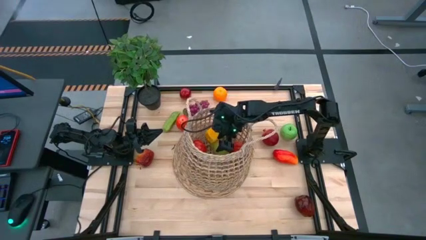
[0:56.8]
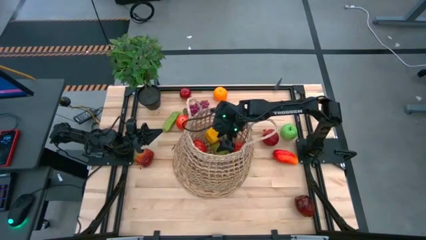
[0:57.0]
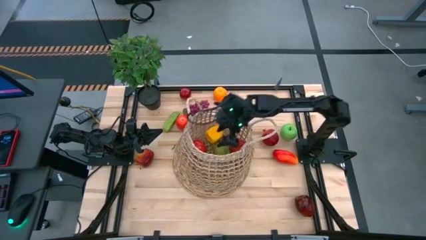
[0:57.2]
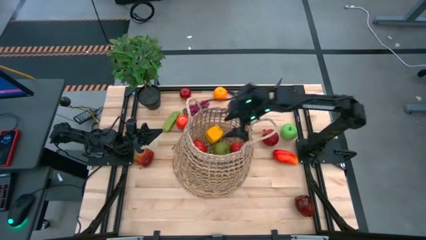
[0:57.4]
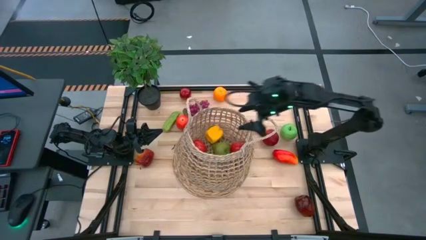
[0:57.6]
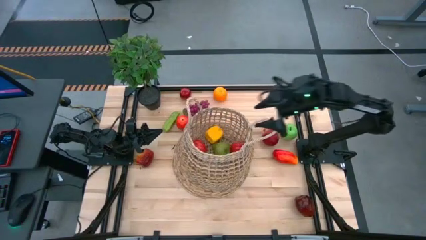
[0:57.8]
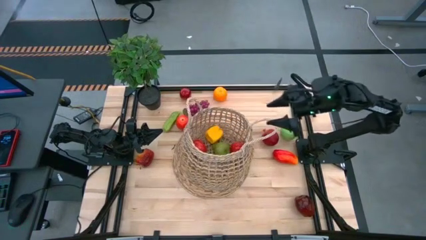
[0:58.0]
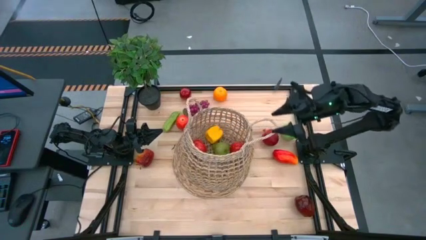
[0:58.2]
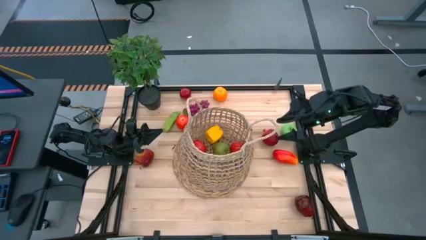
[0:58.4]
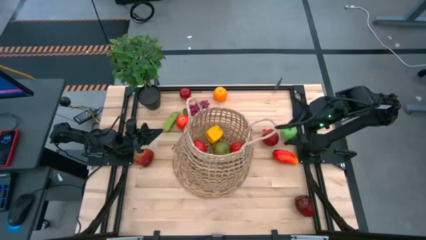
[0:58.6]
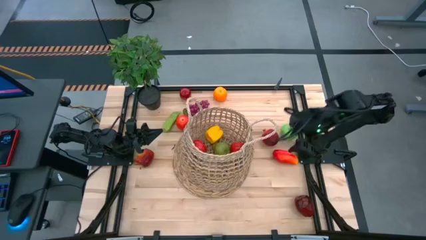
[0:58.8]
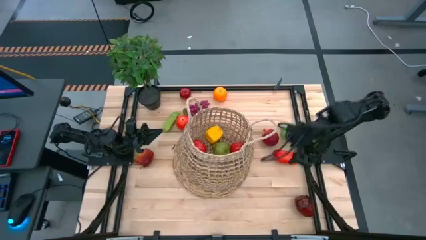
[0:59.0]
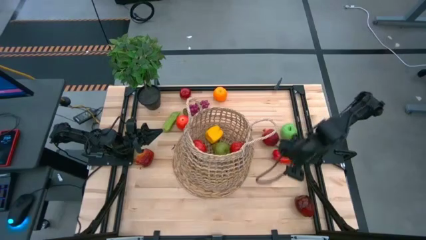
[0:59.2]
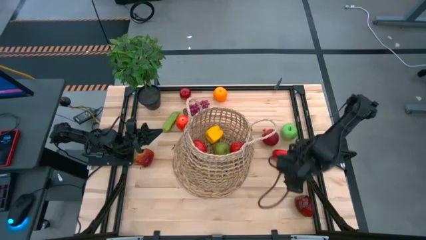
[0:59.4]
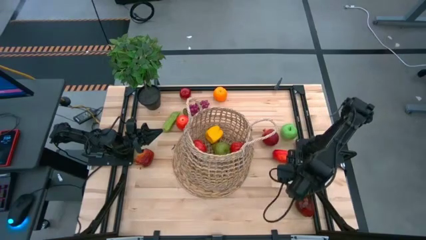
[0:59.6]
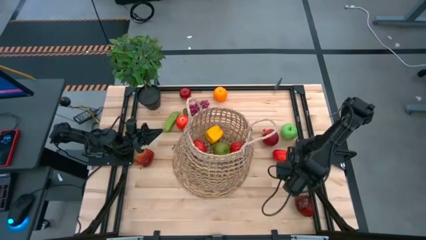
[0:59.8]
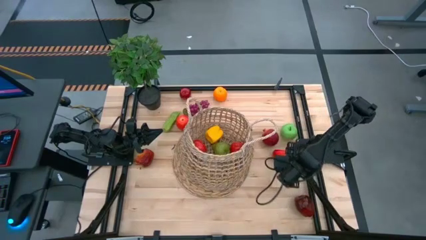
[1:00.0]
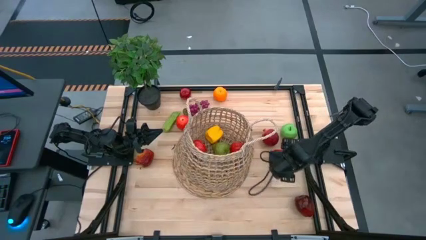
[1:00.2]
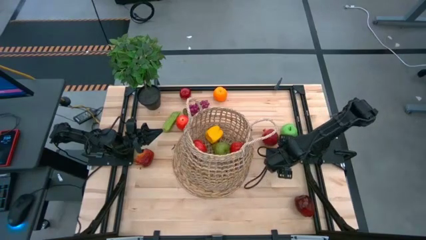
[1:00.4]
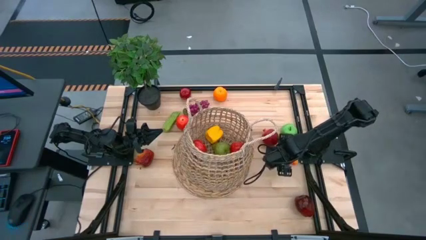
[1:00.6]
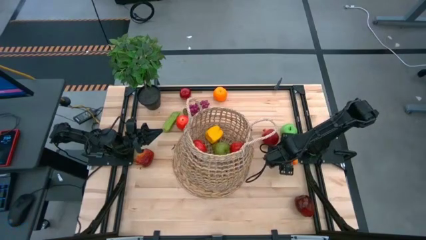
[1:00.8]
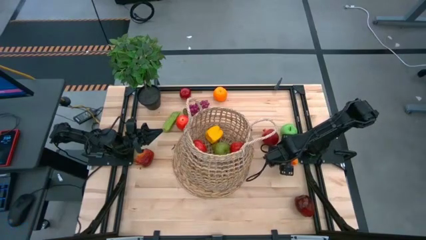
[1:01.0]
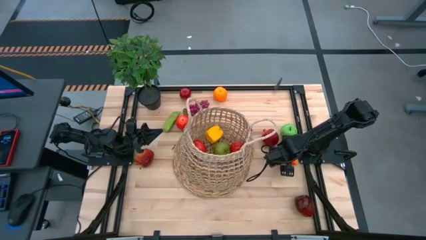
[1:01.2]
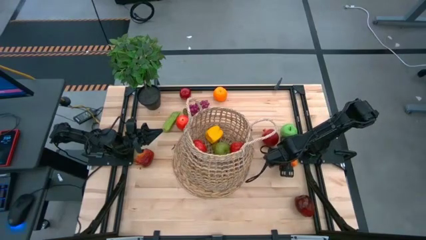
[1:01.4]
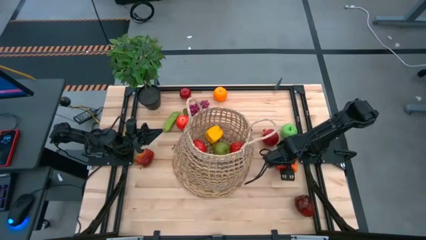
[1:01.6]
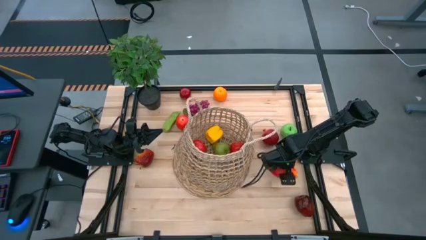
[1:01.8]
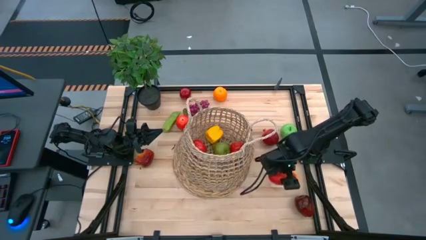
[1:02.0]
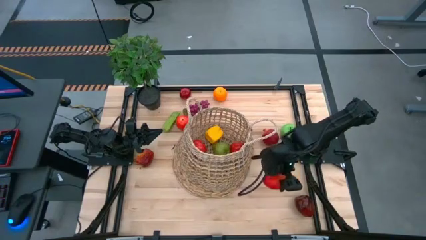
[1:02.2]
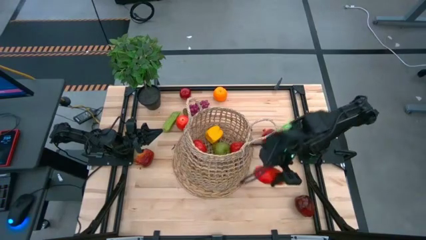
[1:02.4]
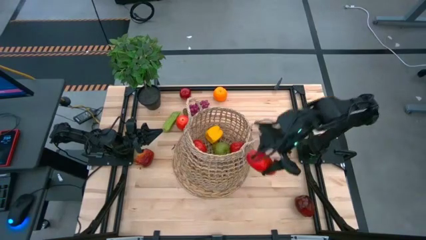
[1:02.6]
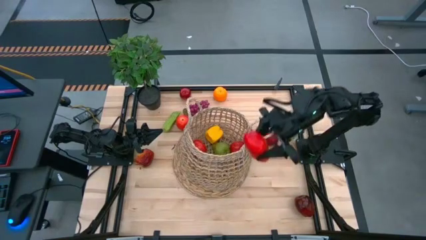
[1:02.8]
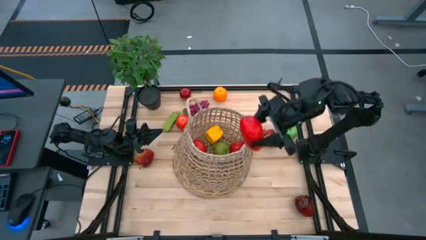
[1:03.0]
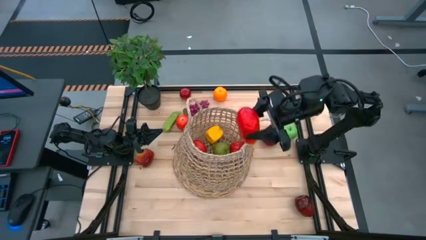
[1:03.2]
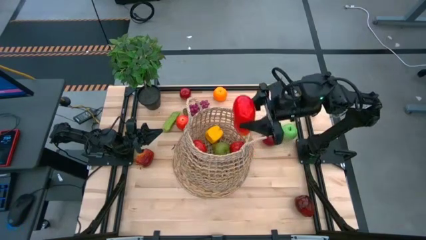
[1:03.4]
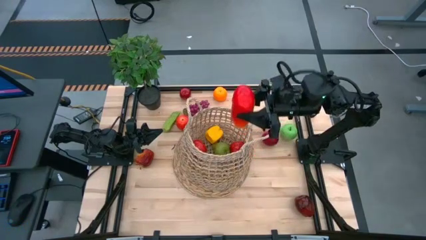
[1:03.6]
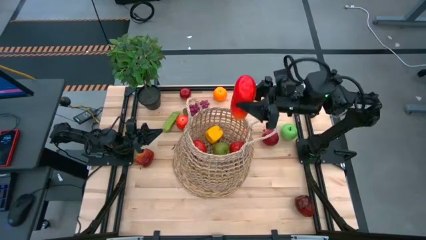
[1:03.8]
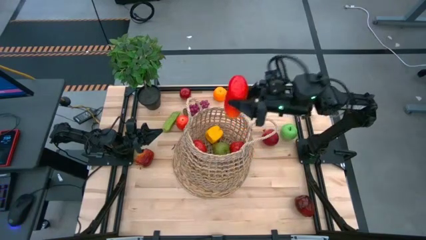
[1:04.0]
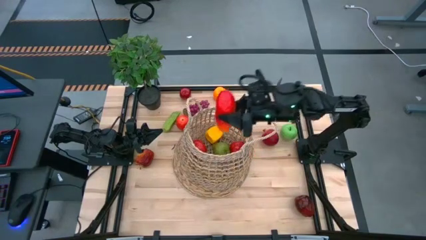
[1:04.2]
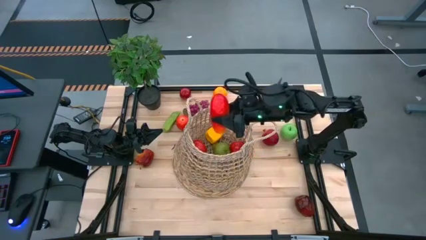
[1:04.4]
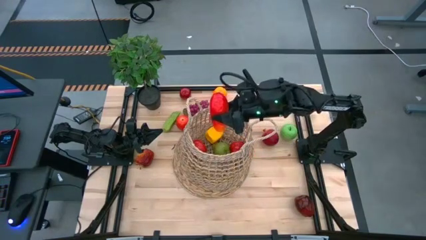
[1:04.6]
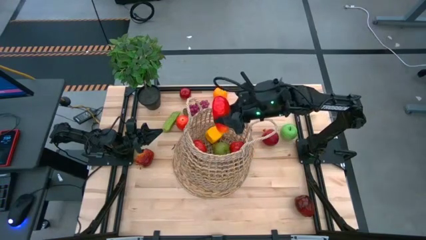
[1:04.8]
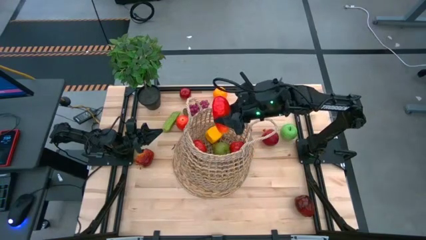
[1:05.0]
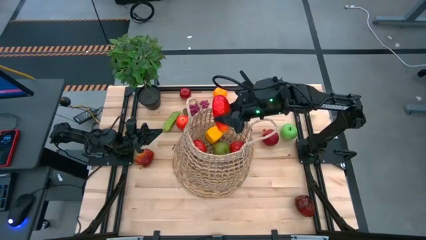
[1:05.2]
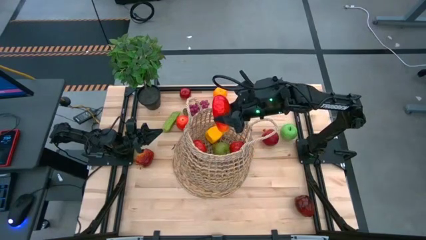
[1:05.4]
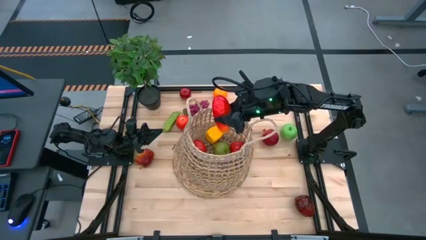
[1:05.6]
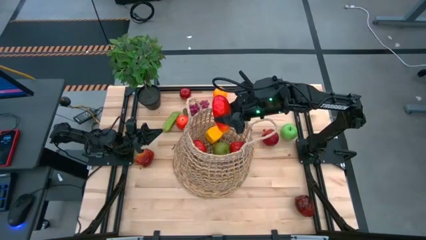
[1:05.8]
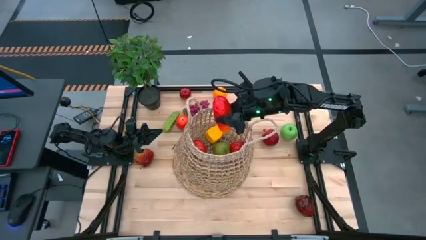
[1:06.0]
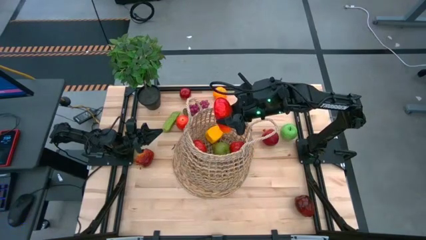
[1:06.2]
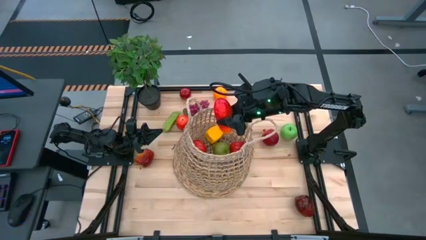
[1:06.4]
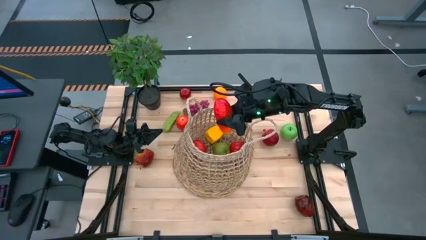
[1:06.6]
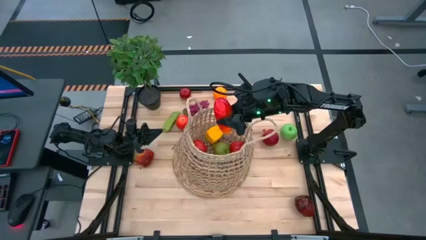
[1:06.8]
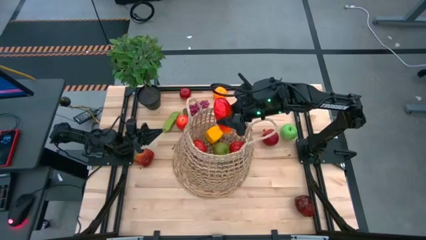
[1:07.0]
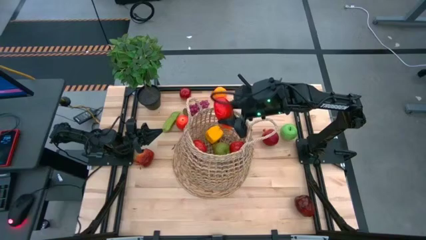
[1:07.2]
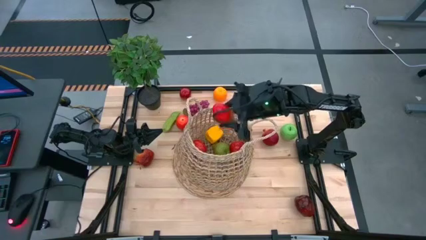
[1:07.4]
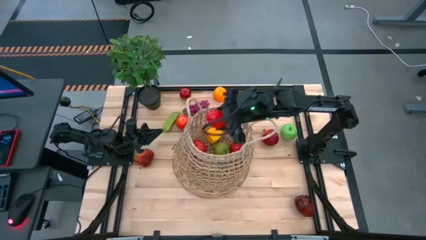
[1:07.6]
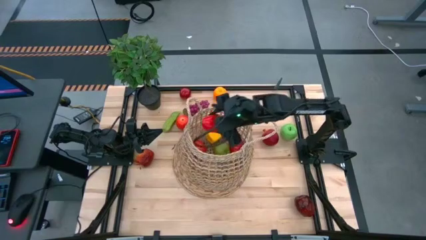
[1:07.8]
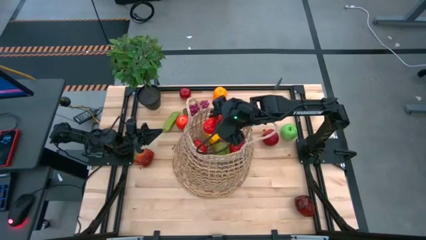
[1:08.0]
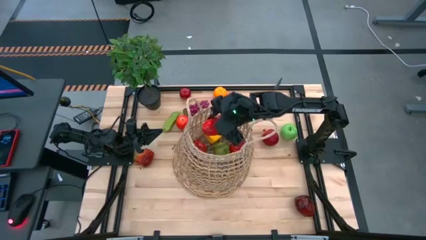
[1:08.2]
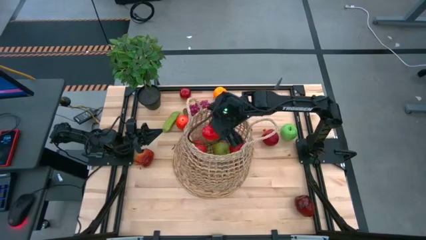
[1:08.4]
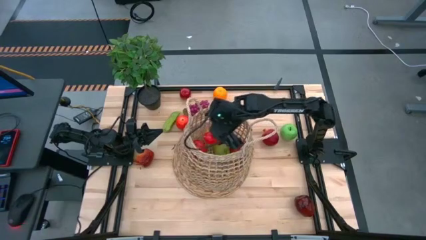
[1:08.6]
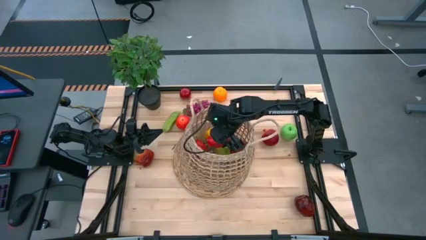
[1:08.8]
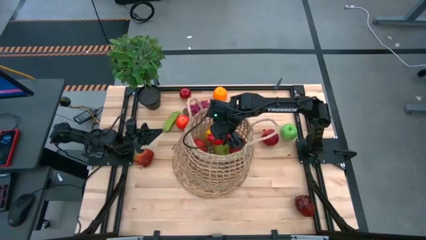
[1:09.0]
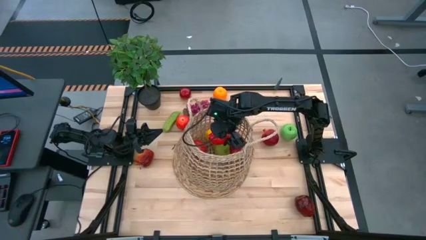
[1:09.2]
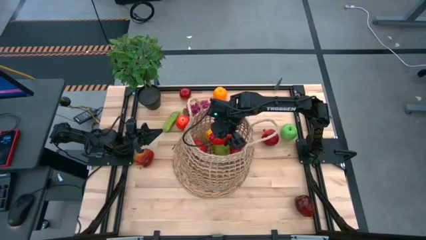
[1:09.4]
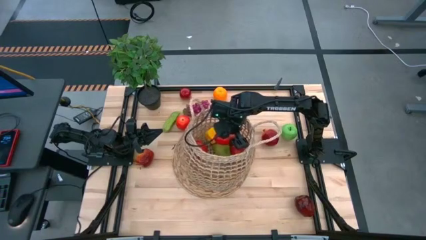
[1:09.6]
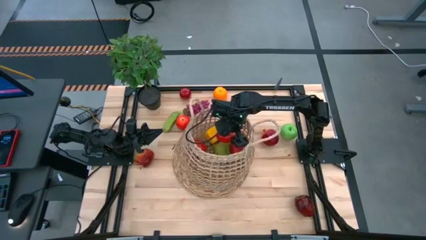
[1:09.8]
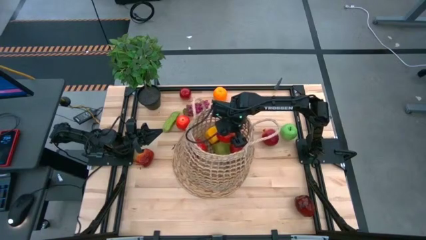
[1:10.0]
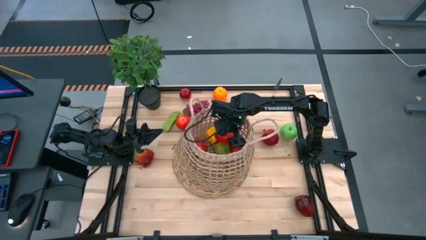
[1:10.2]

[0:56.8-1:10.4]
Task: Build produce basket
Put the red mango into the brown basket

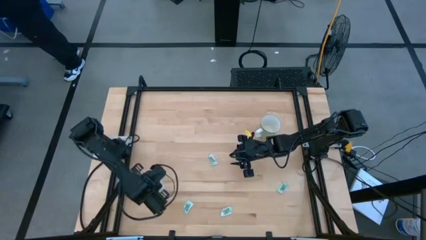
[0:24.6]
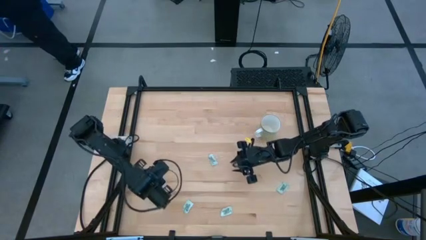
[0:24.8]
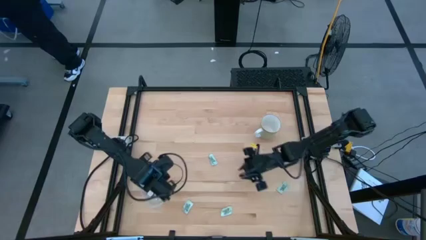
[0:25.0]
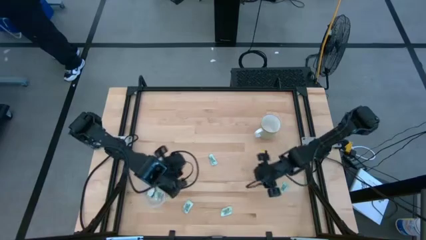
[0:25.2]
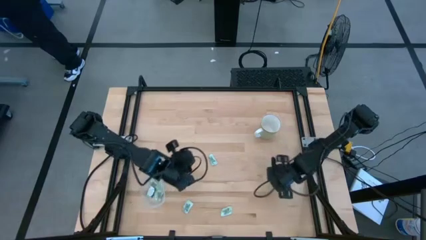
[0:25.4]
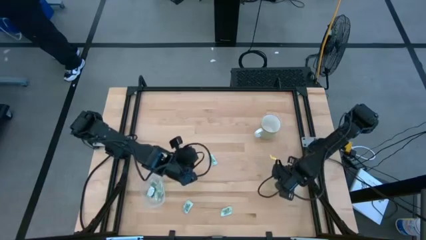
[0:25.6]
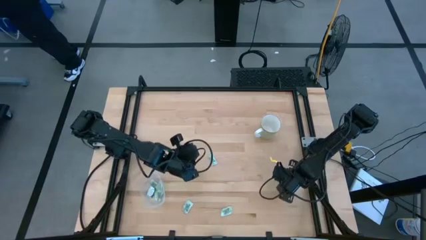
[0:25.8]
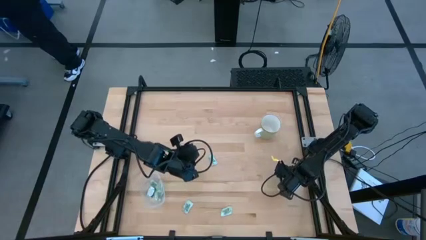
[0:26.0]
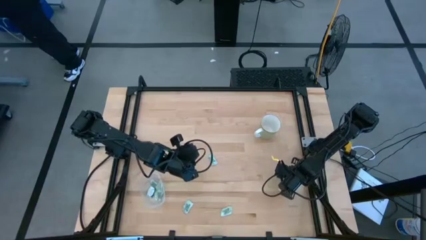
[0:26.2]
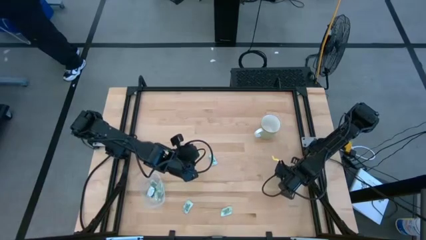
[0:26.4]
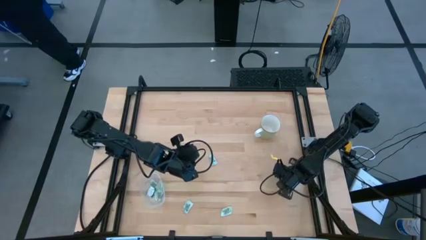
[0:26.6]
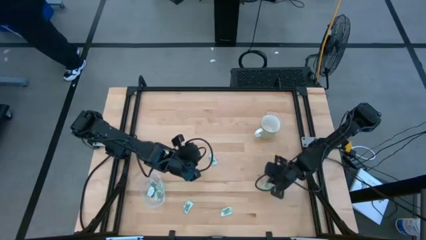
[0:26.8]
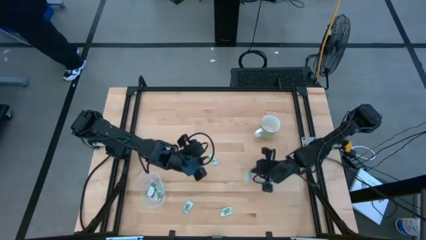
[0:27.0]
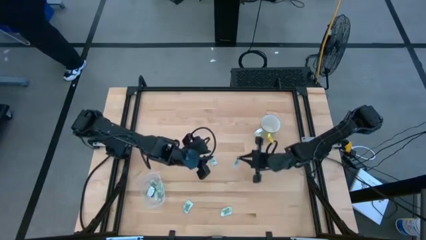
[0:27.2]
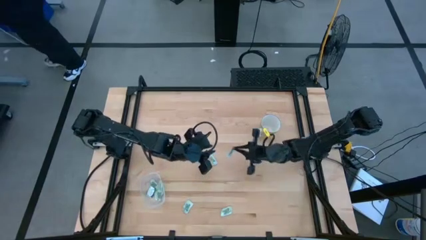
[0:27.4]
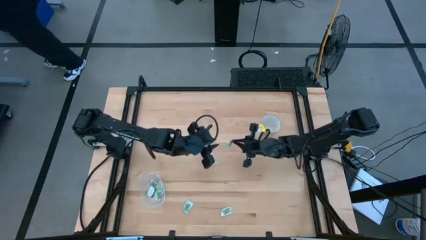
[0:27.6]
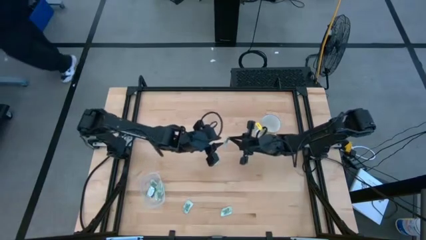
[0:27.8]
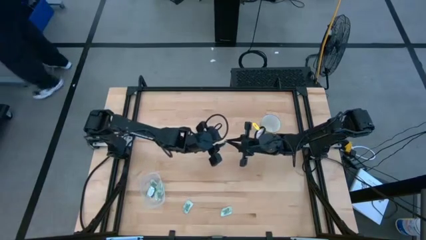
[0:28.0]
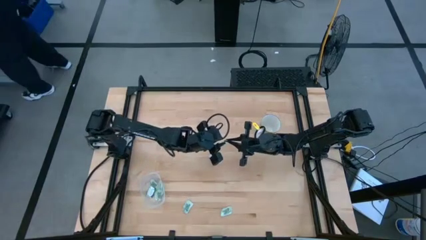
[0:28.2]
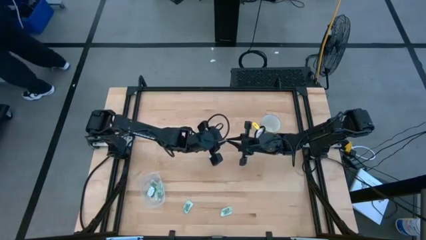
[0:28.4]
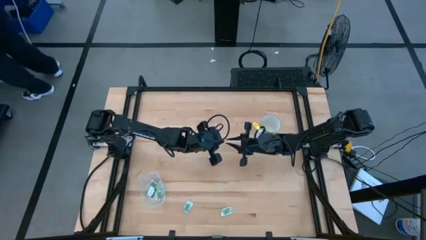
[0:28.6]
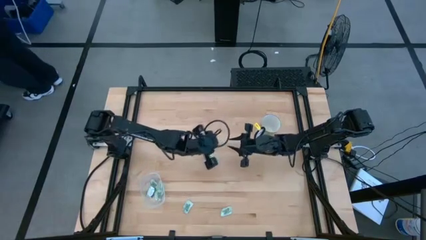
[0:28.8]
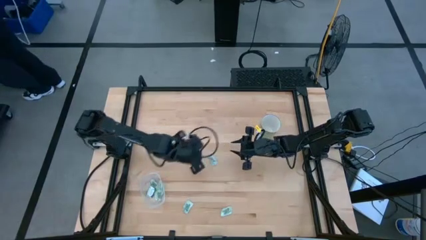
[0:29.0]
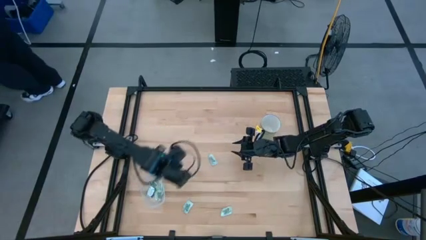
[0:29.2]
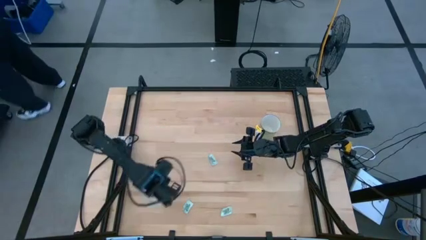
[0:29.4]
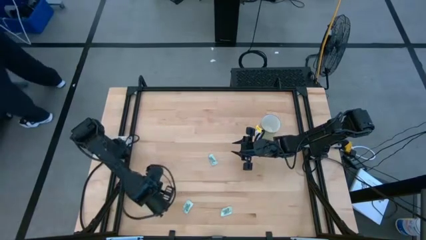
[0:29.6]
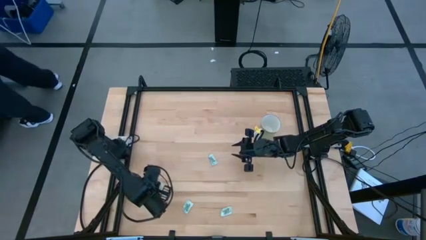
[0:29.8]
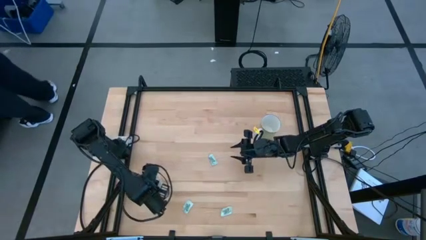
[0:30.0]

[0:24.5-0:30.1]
Task: Pick and place Stevia / Truvia into bins
Put the stevia packet into the transparent bin
